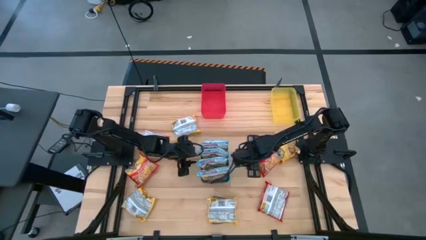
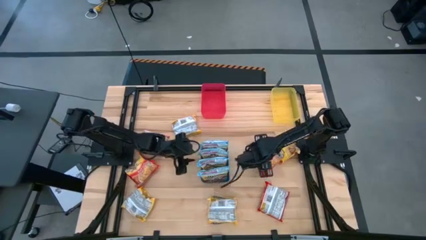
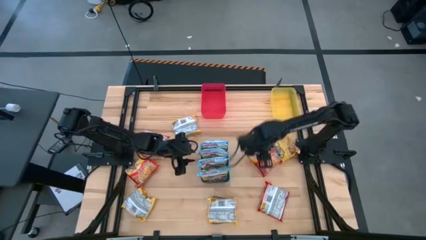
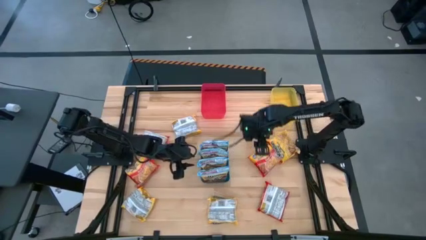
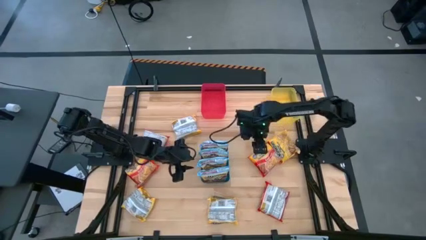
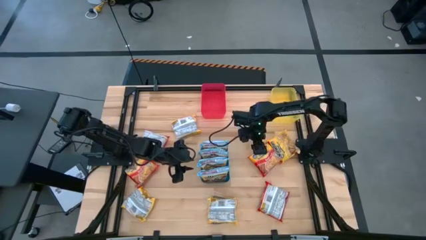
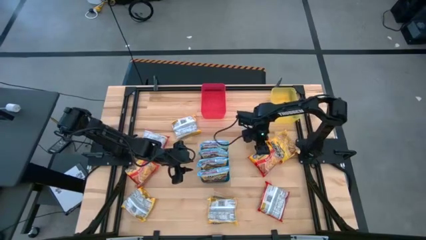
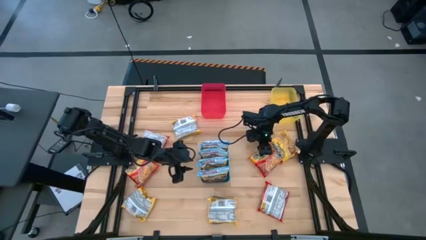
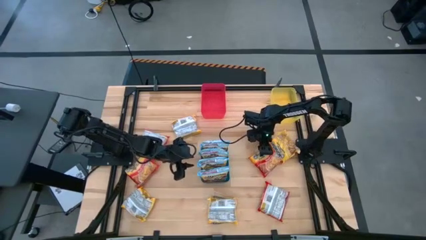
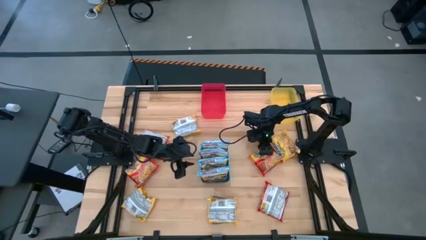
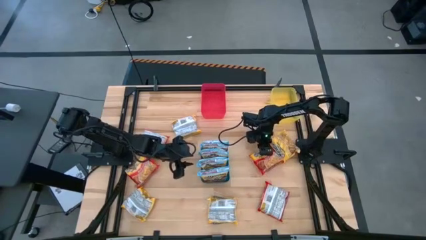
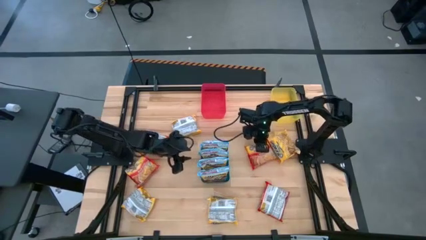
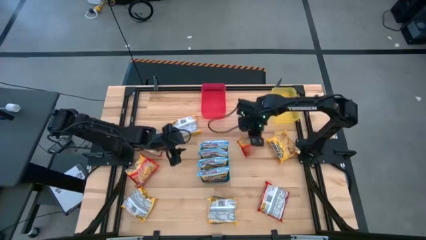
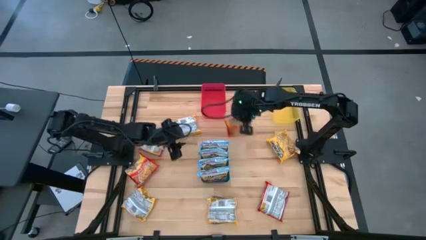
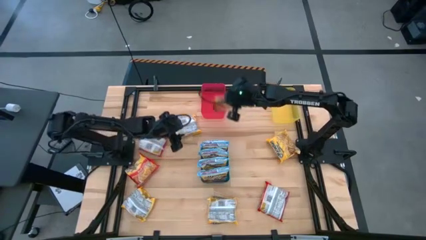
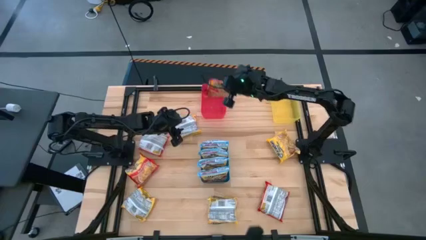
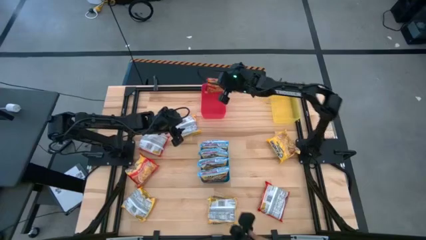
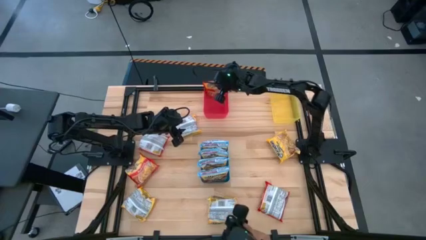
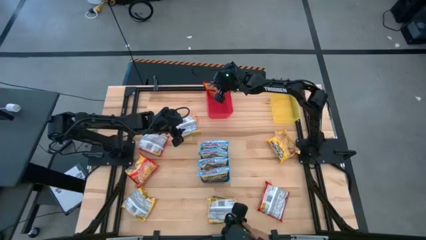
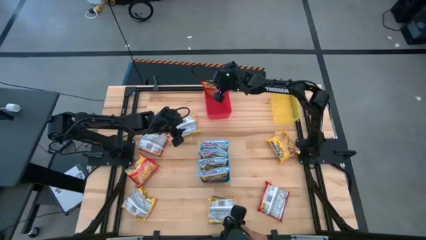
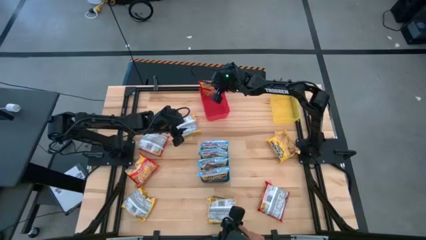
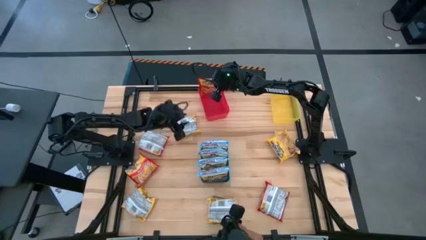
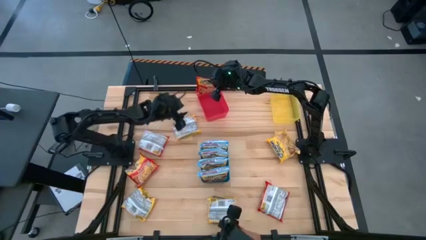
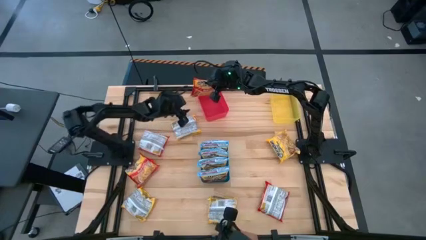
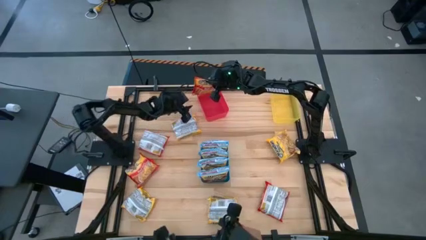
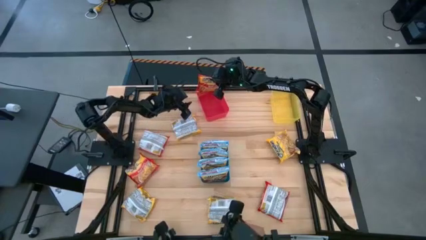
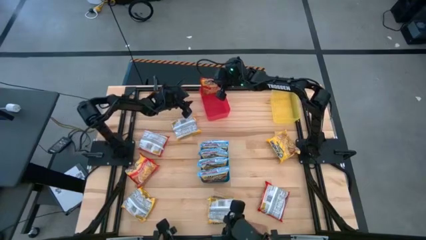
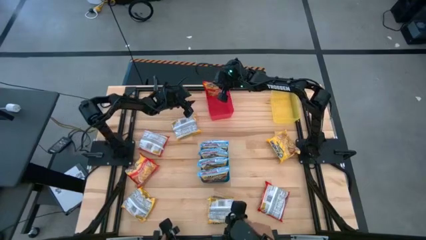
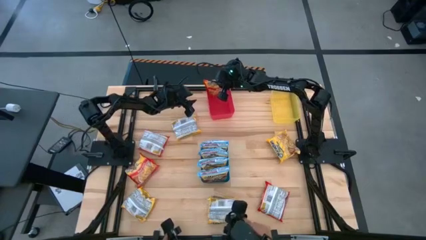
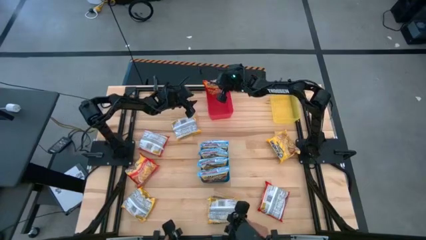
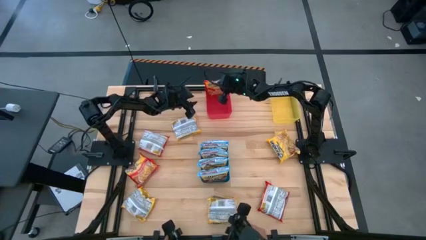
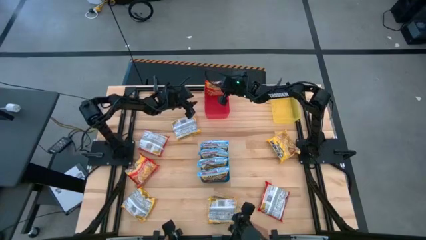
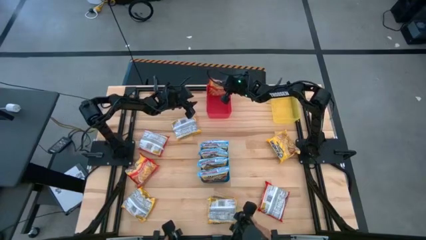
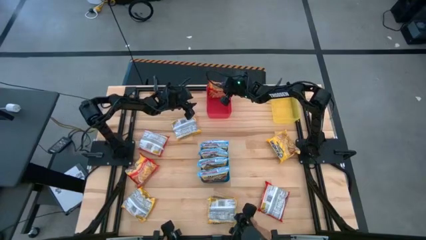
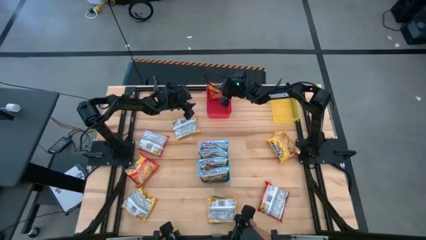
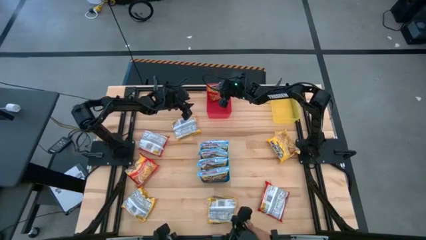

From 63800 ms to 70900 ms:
Task: Sort Maruchan noodles
Put the red noodle pack into the red bin

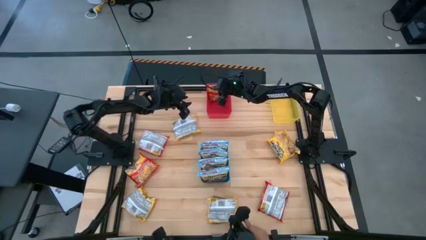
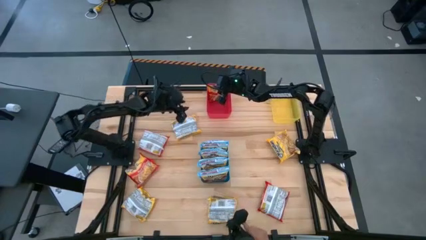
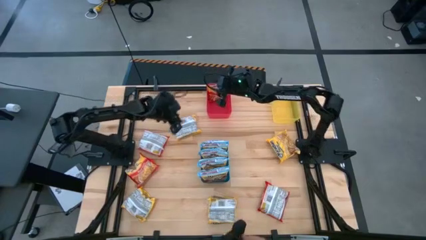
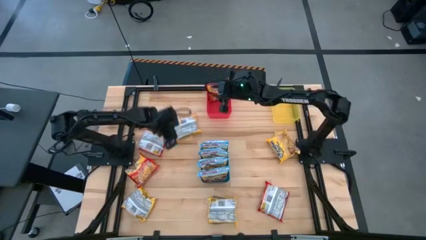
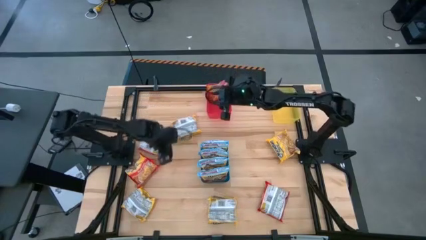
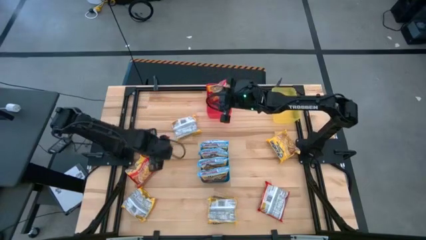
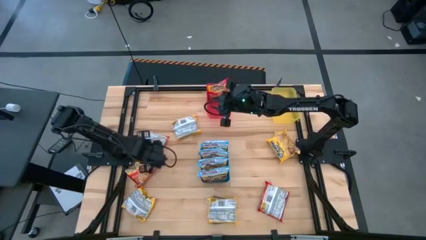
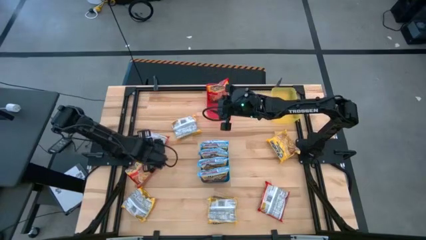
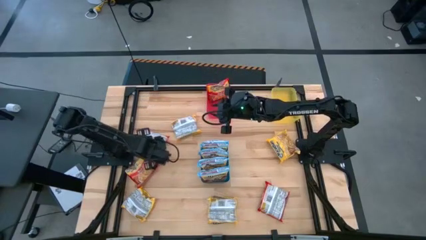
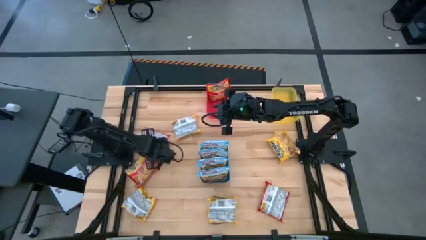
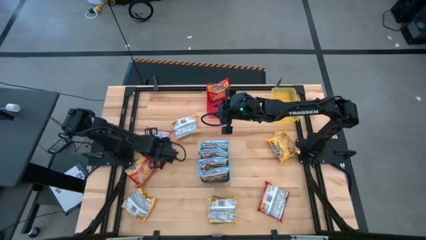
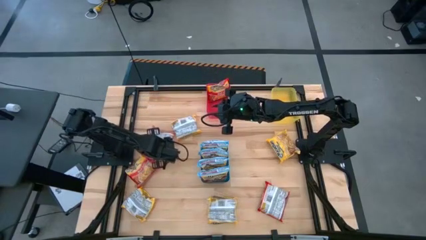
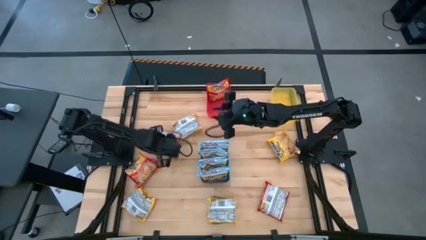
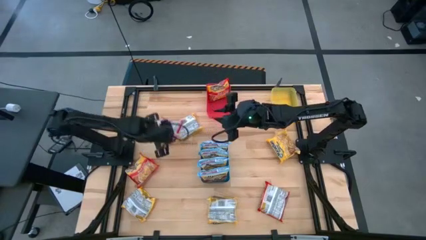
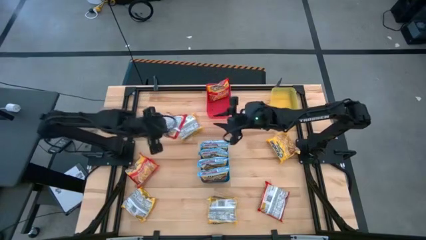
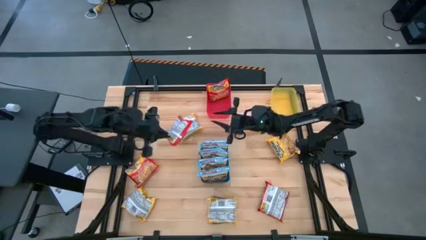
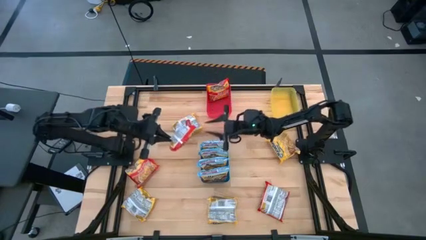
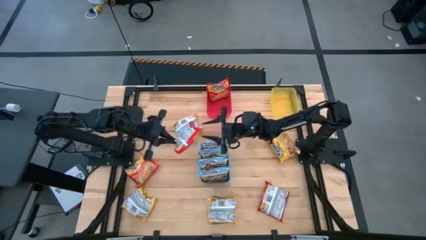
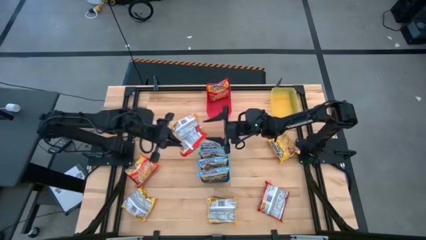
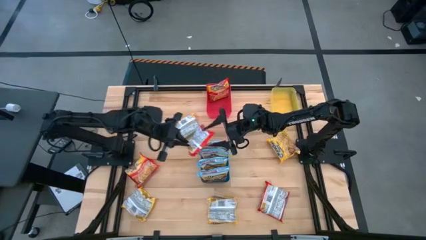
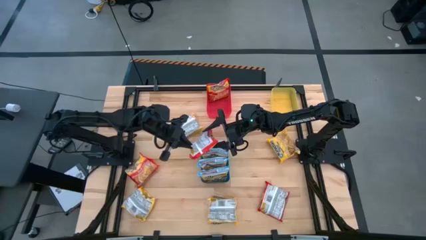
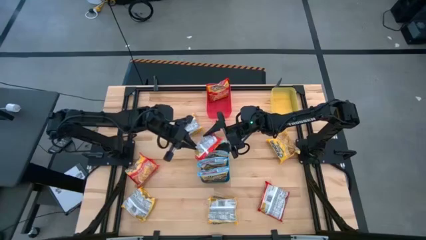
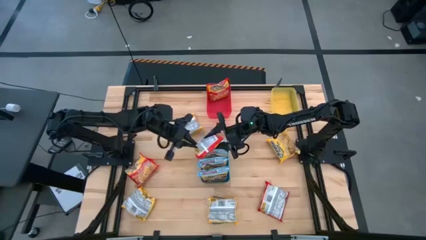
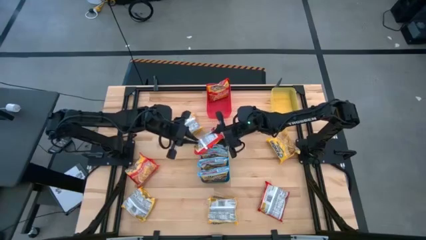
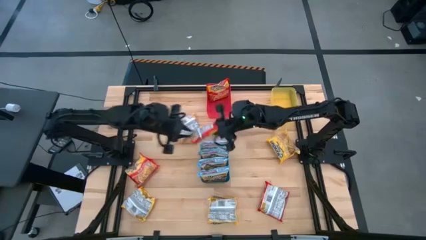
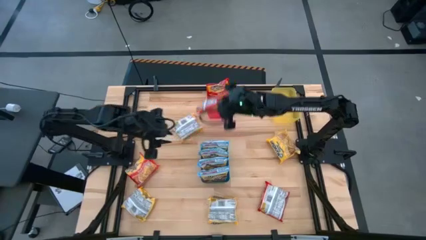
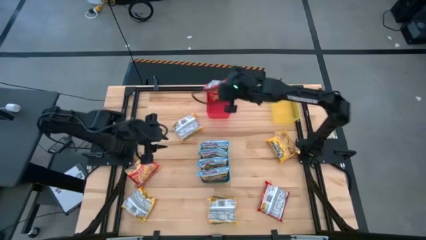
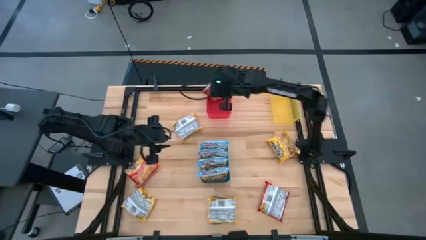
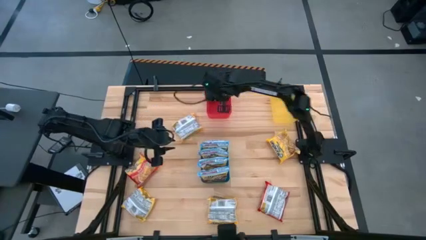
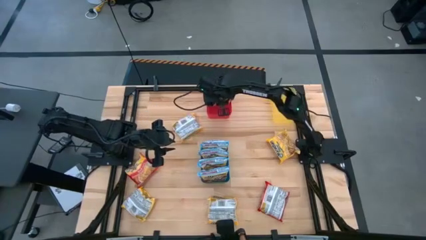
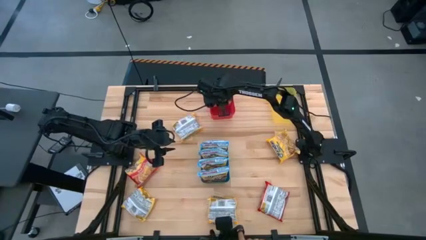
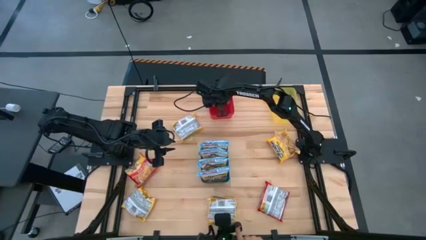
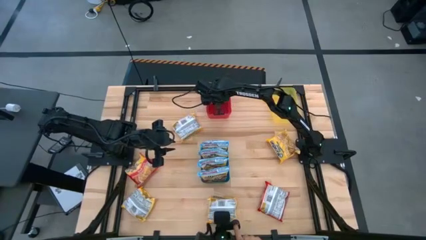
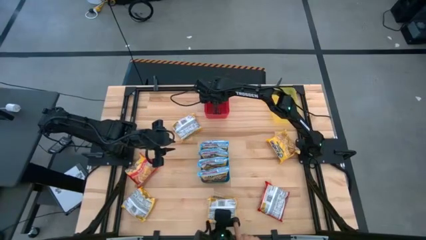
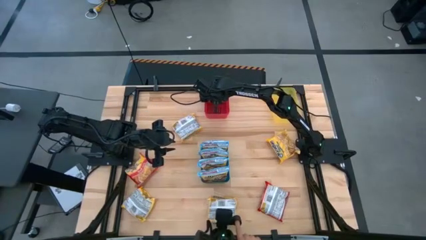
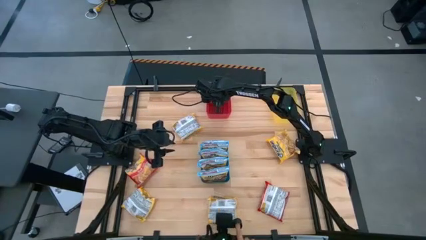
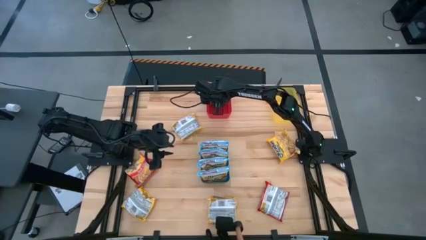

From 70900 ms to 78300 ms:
Put the red noodle pack into the red bin
